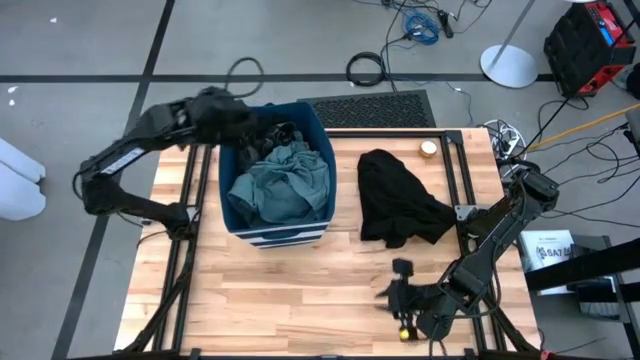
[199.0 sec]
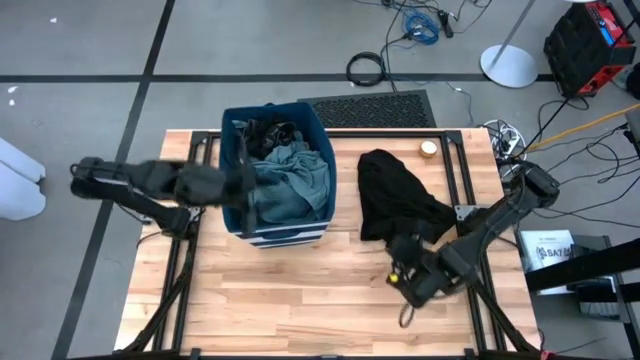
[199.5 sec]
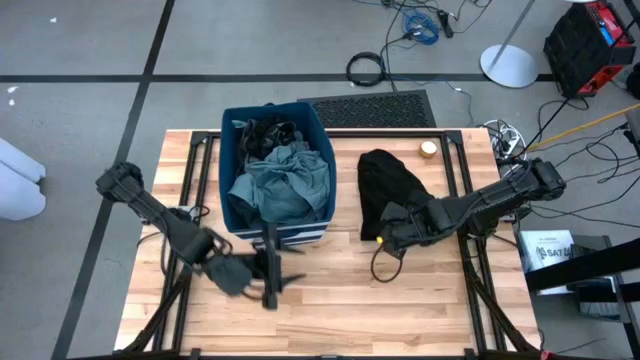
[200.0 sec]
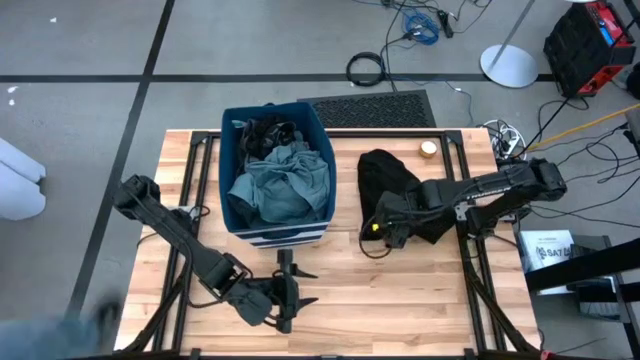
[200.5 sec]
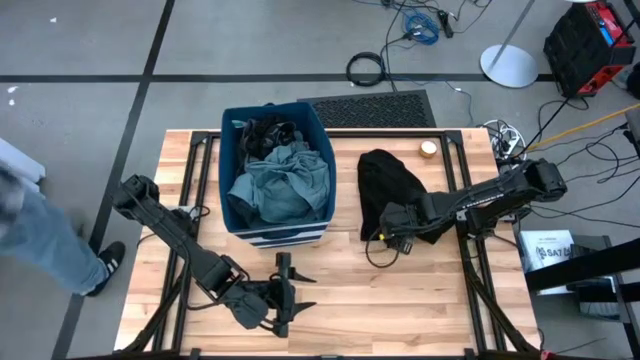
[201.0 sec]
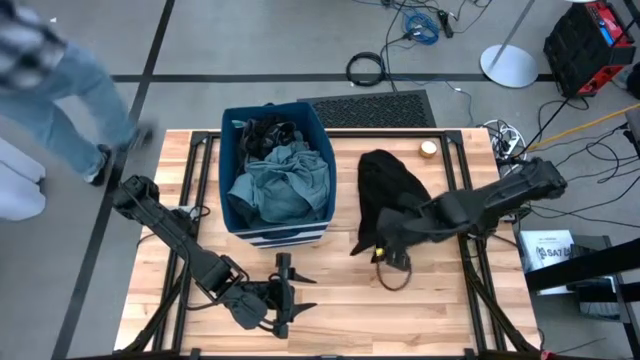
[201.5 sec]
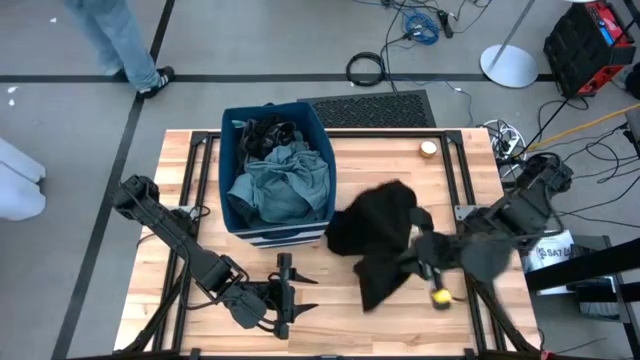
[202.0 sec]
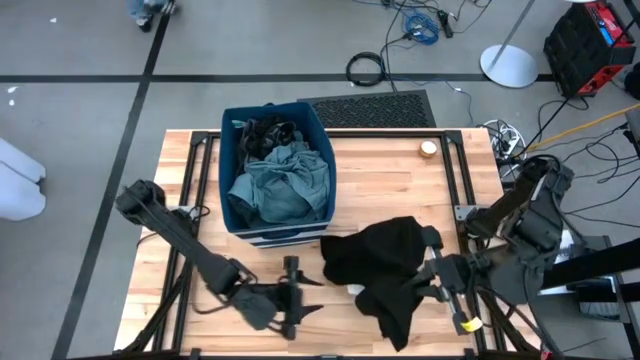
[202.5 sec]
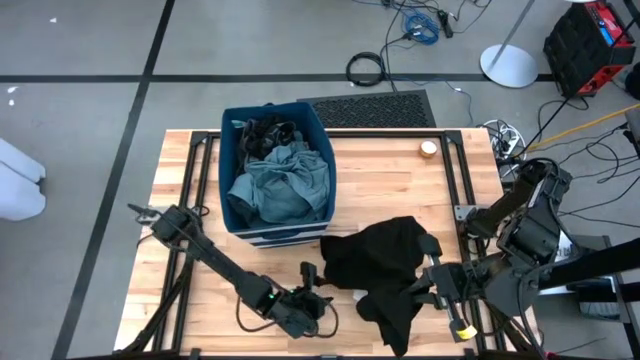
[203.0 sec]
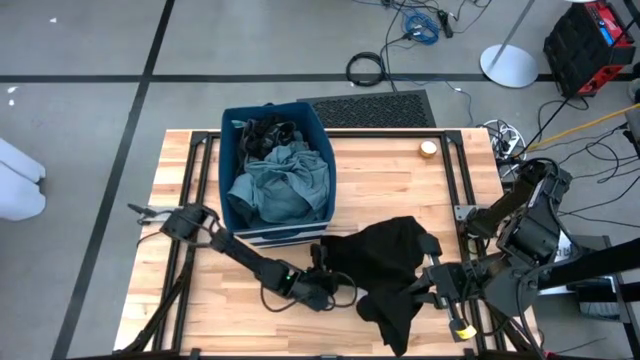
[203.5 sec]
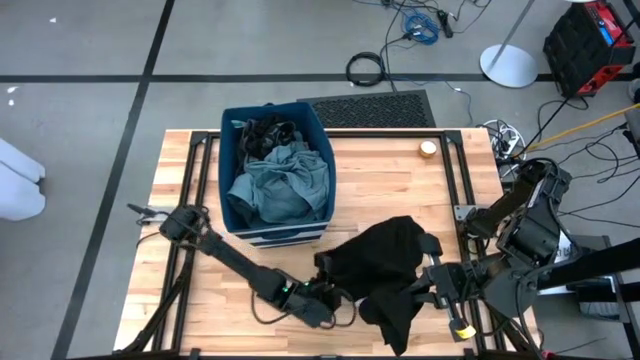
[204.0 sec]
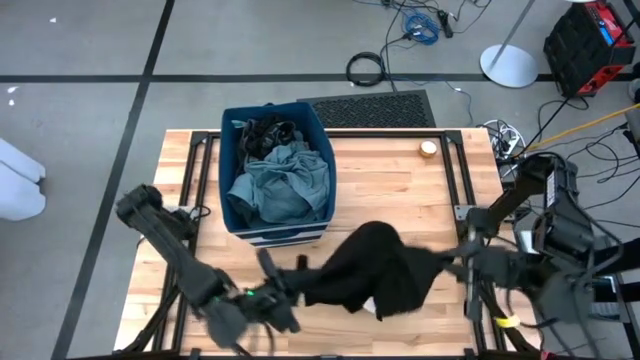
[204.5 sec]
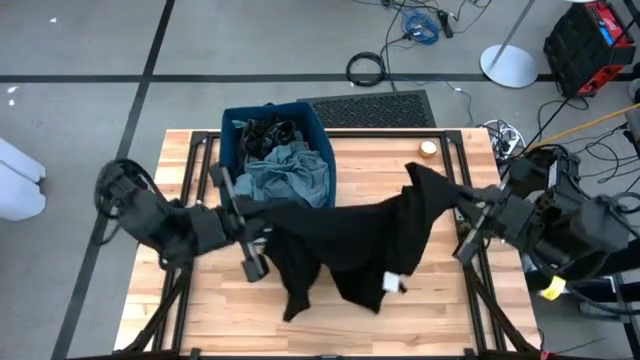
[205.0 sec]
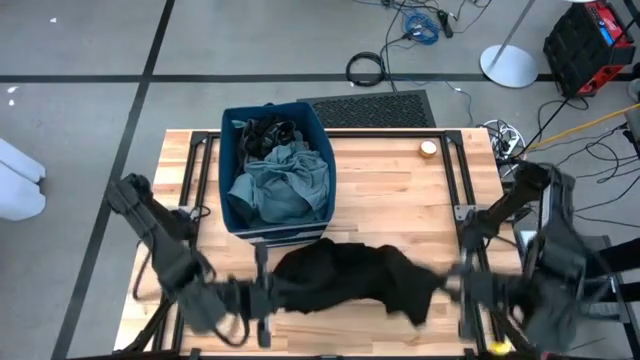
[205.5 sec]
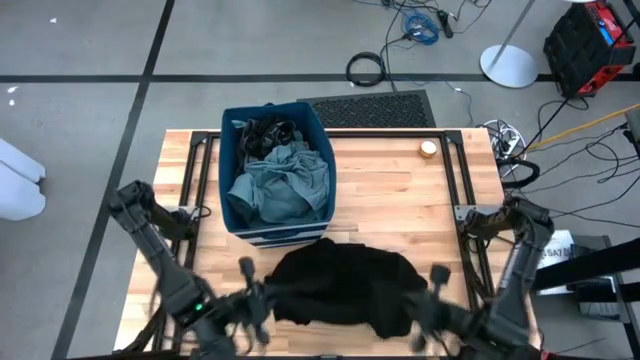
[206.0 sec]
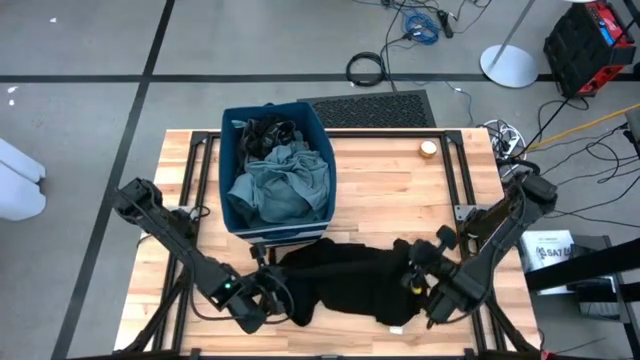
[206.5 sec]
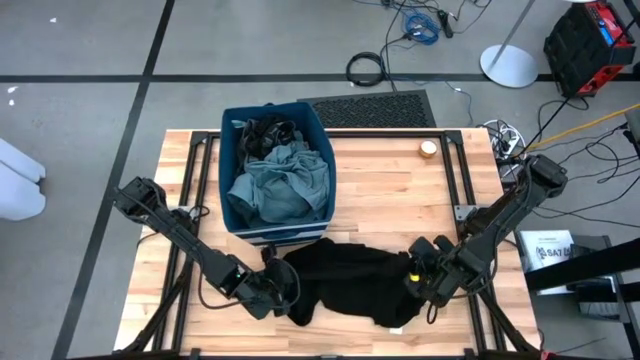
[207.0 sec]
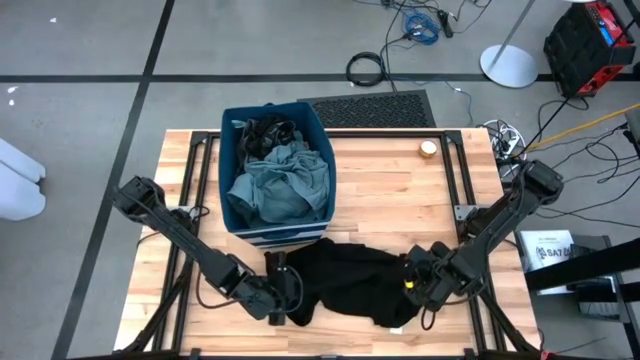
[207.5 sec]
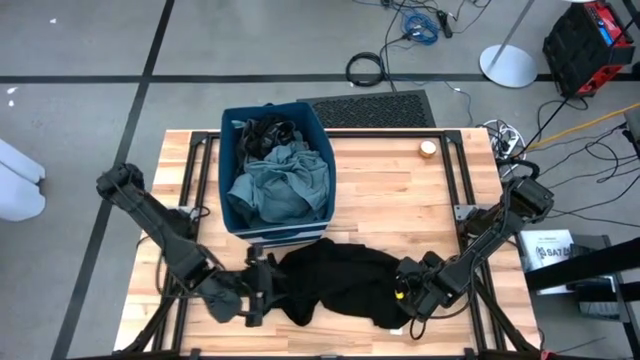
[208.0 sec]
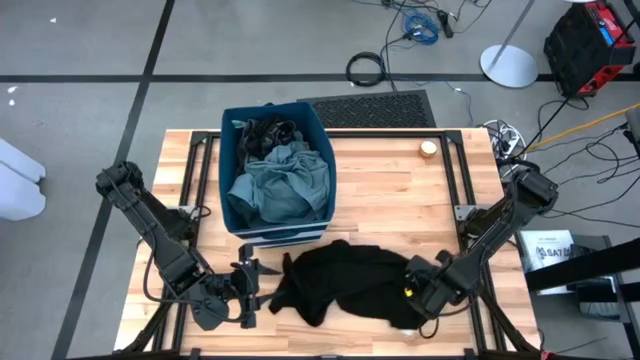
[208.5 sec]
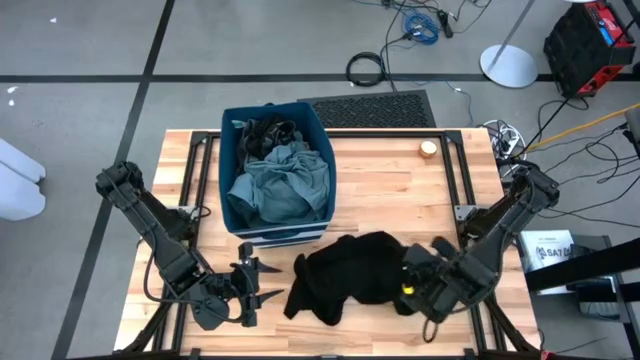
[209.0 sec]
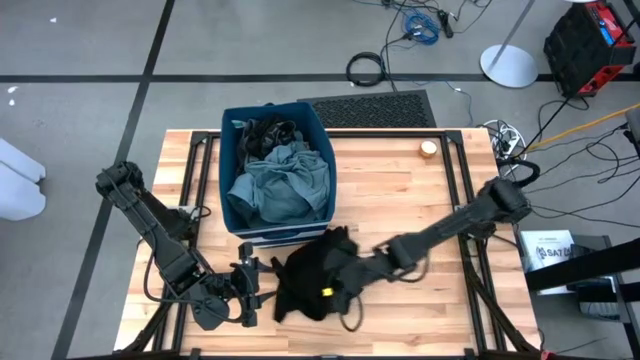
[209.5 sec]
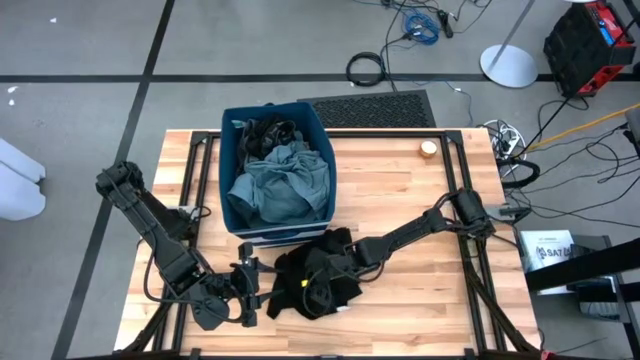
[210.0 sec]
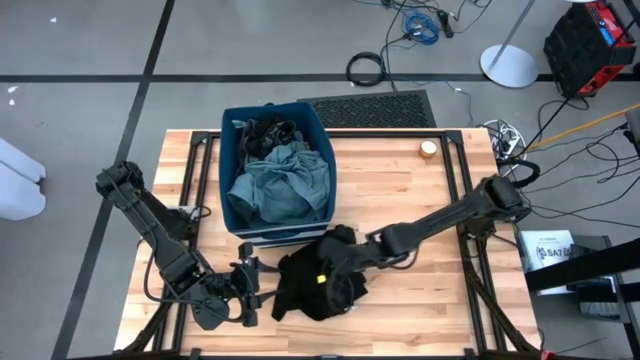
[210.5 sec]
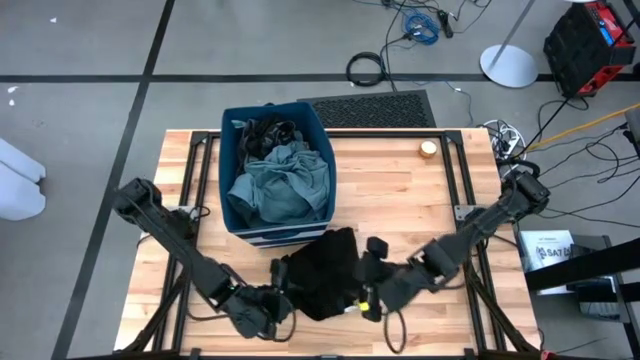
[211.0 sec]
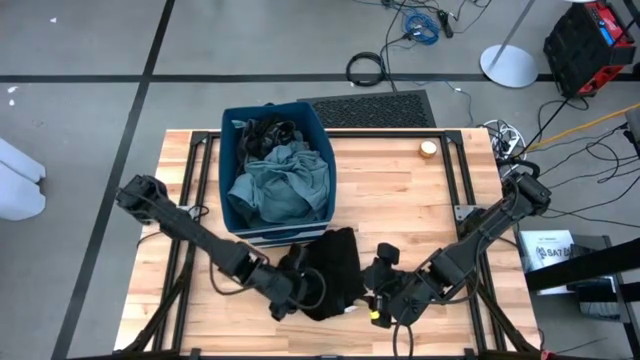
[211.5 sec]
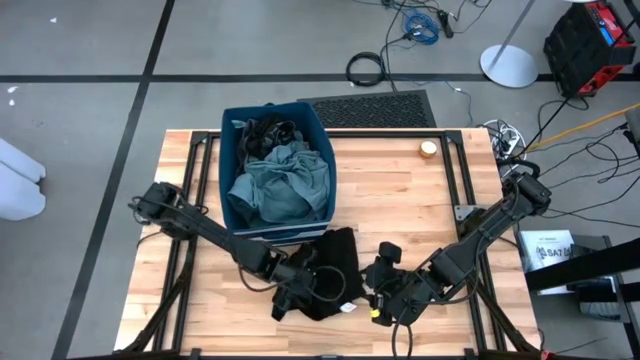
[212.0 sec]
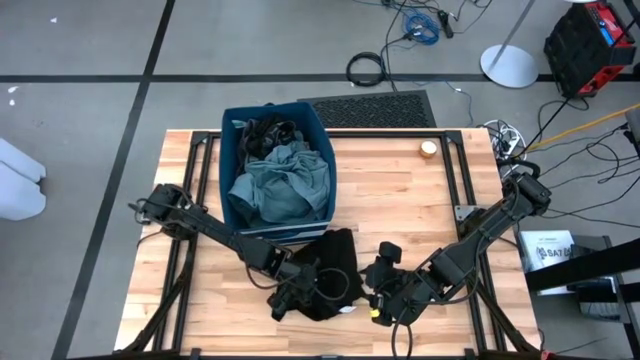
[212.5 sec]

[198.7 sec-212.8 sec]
Task: Sort clothes
Put the black shirt into the blue laundry organizer

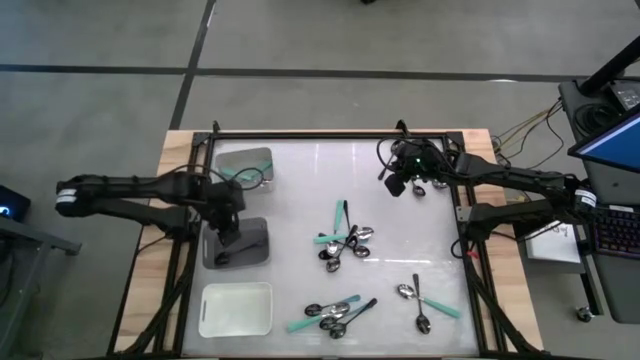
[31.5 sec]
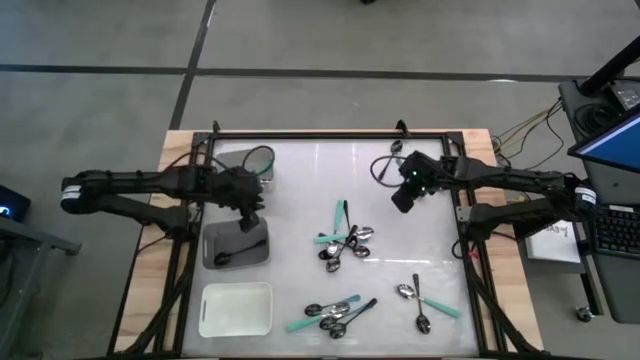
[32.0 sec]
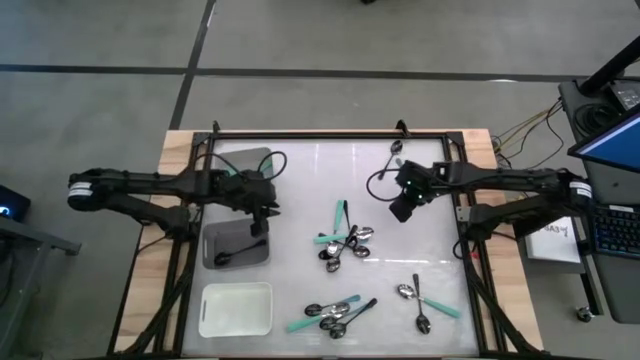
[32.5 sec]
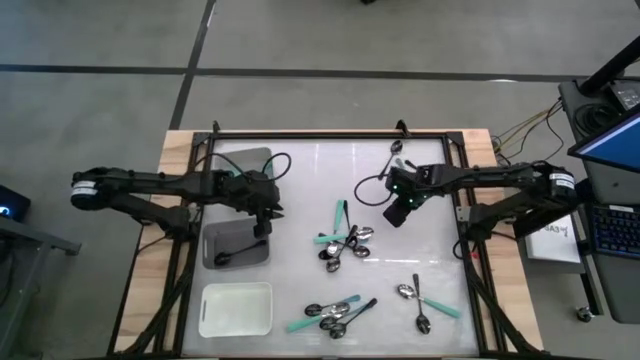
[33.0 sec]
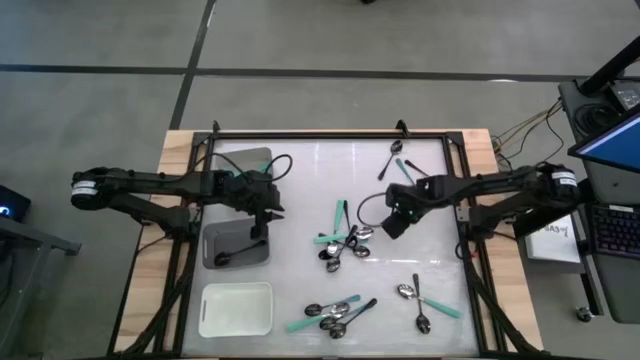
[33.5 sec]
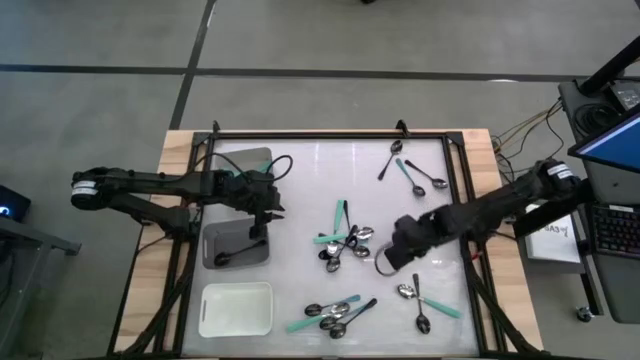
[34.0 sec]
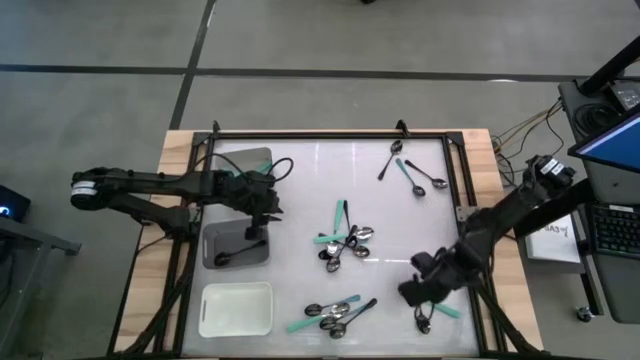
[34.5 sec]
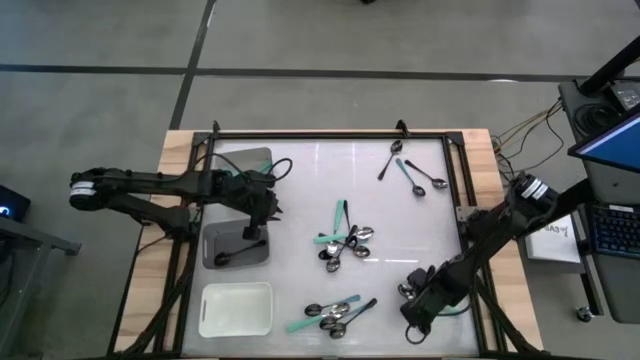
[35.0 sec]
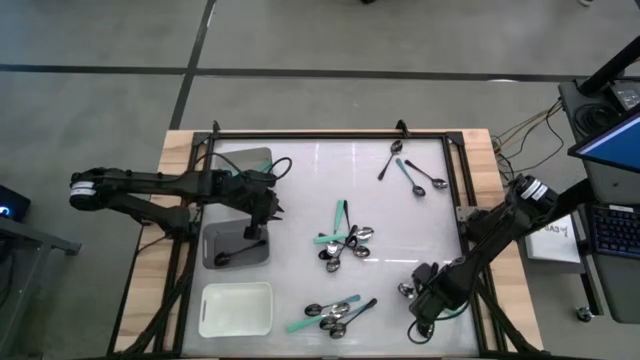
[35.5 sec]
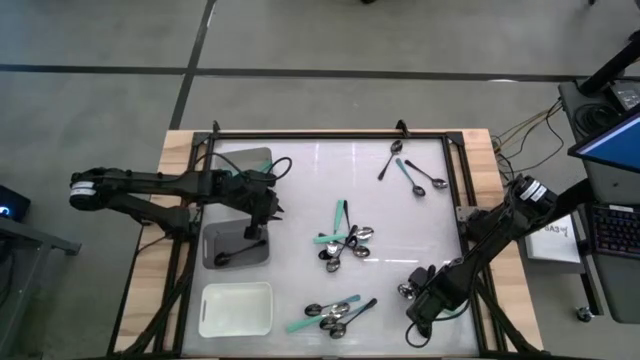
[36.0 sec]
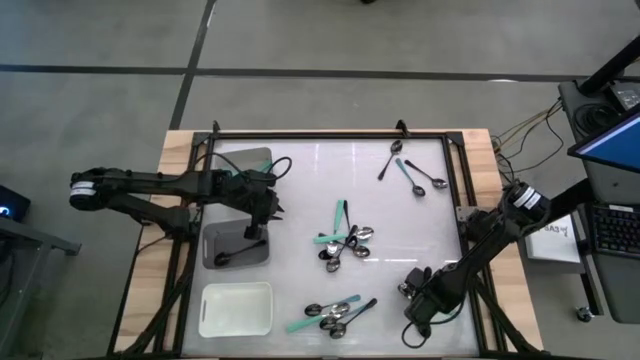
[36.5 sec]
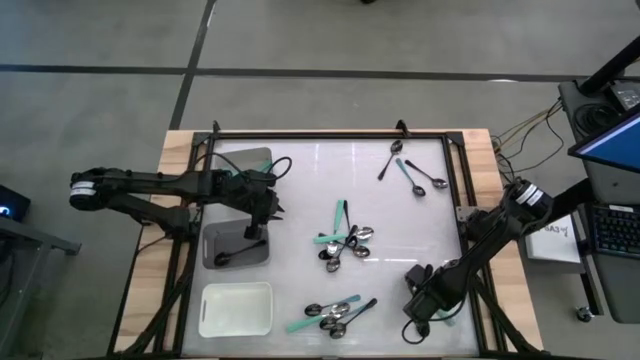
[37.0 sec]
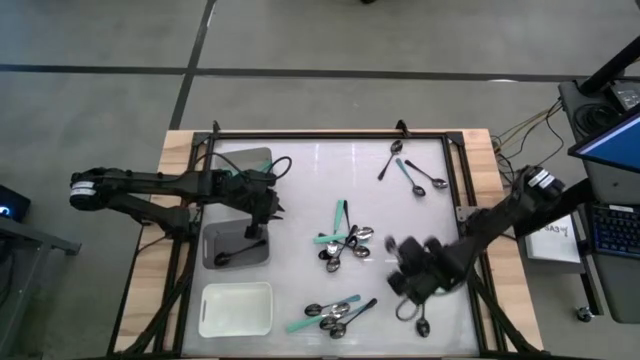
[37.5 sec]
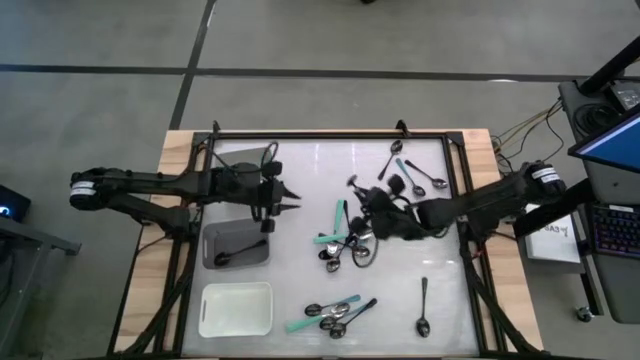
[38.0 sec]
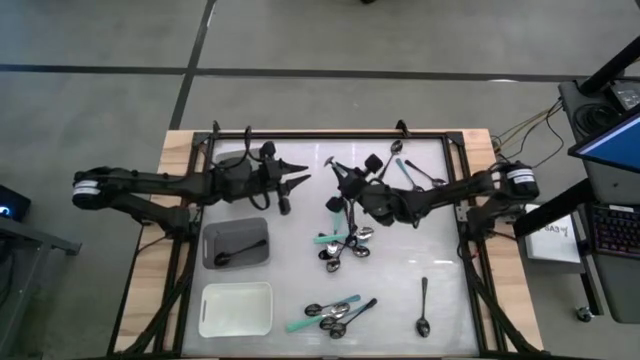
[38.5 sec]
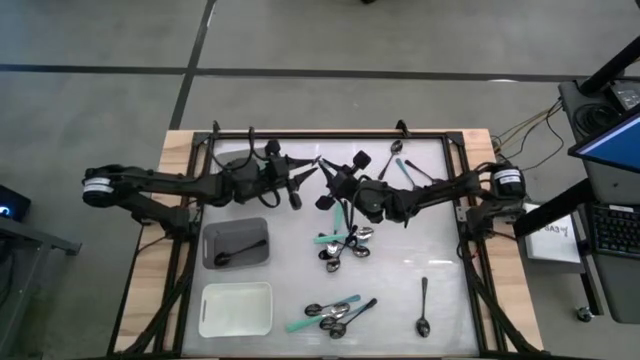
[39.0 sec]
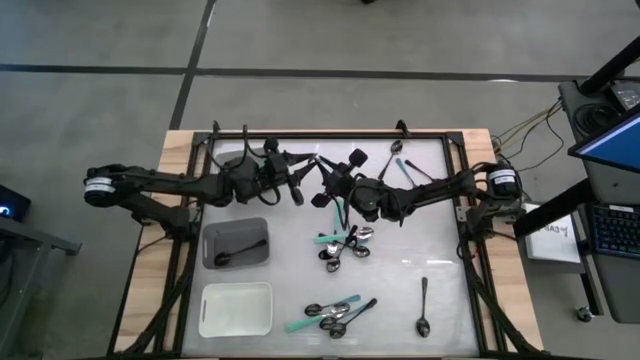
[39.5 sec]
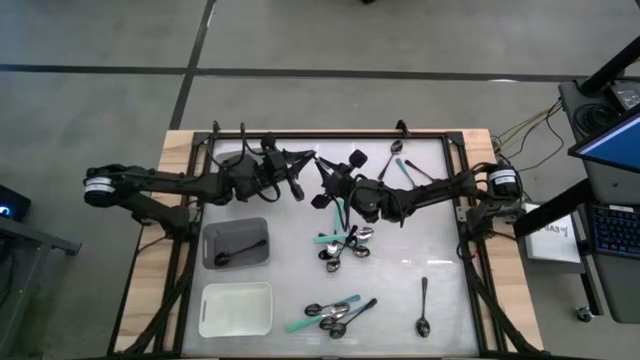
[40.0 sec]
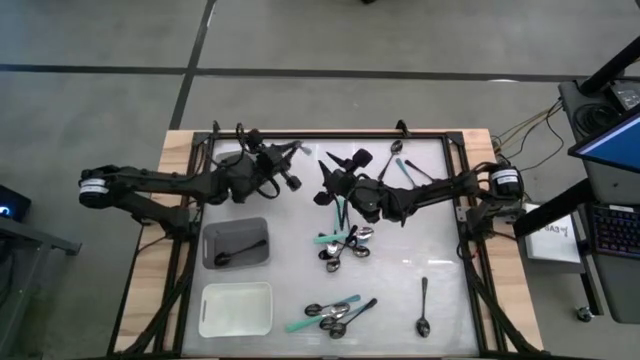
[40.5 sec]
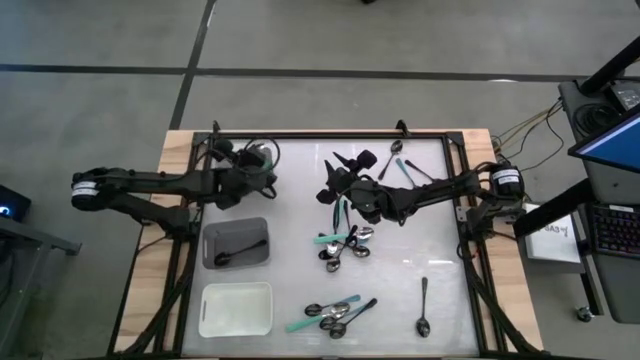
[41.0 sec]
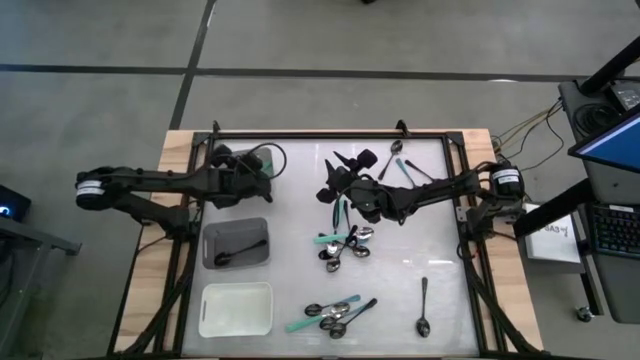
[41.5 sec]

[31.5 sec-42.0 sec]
Task: Sort silverware by color (type)
Put the green spoon into the gray bin
